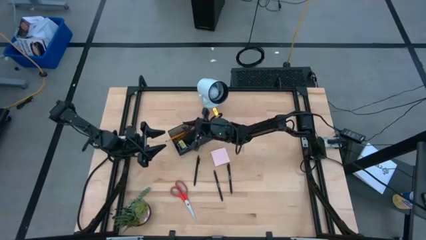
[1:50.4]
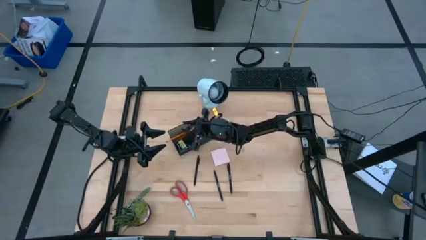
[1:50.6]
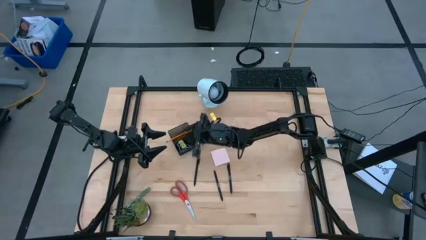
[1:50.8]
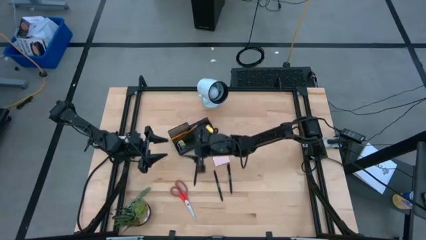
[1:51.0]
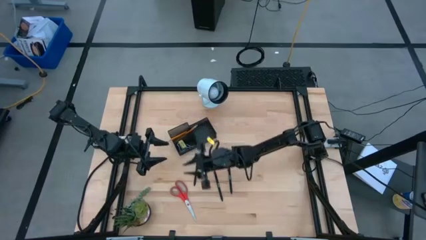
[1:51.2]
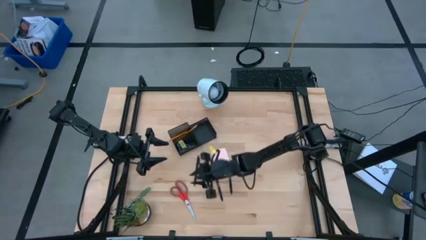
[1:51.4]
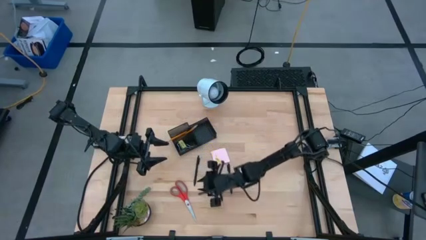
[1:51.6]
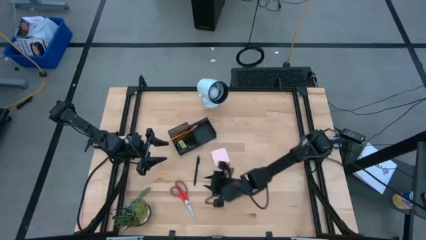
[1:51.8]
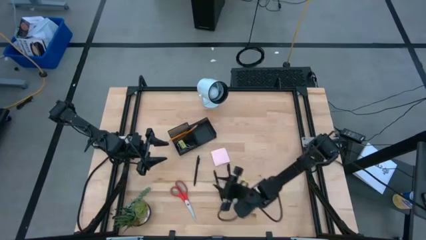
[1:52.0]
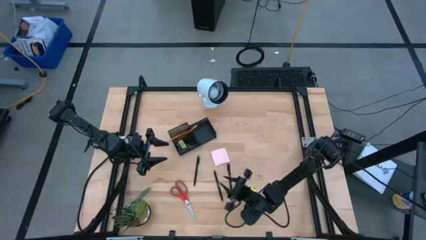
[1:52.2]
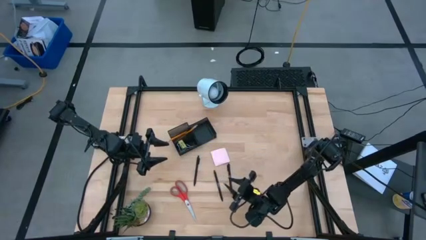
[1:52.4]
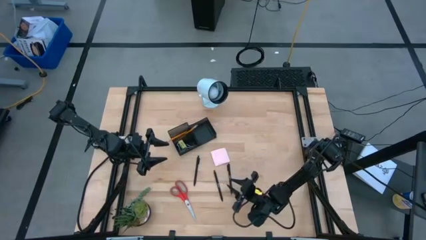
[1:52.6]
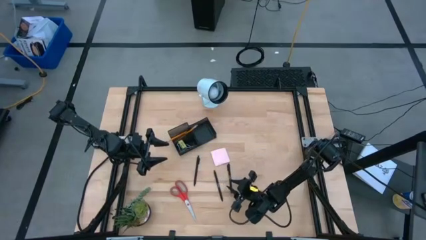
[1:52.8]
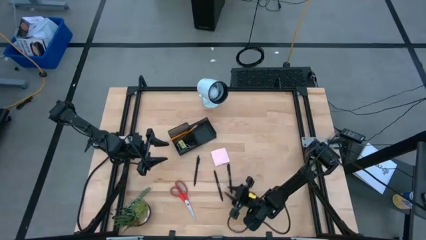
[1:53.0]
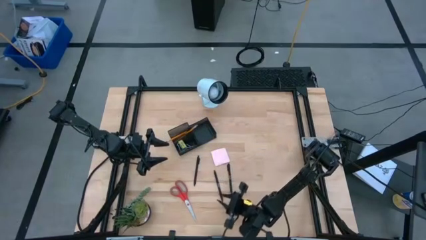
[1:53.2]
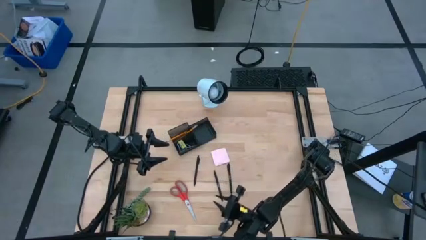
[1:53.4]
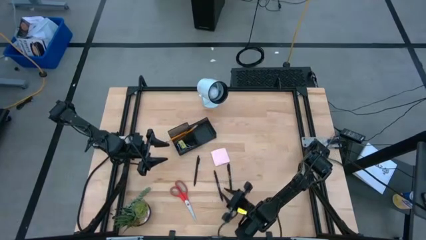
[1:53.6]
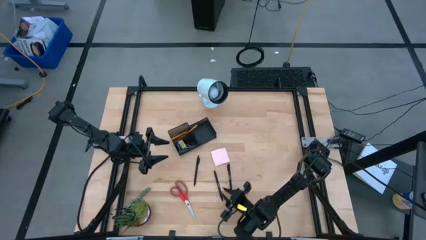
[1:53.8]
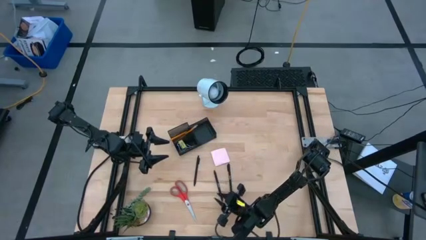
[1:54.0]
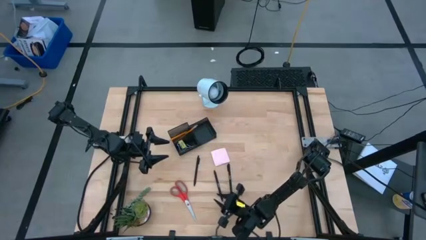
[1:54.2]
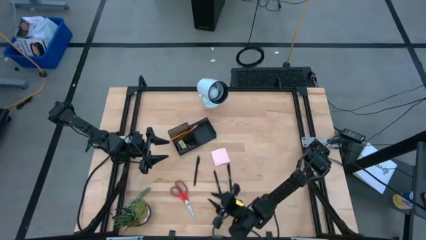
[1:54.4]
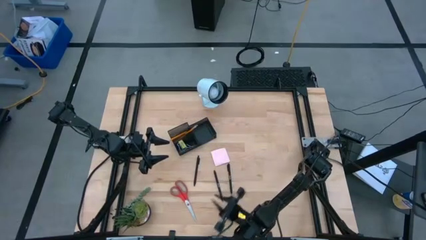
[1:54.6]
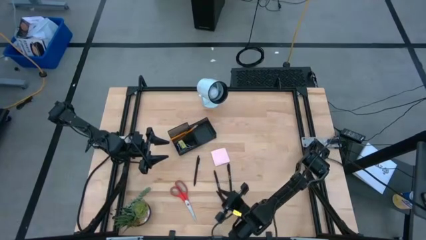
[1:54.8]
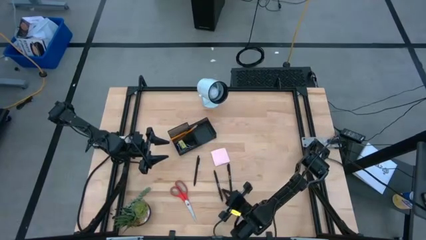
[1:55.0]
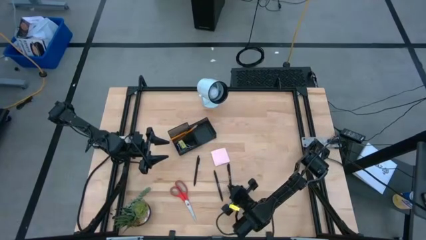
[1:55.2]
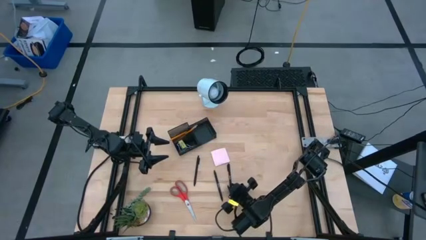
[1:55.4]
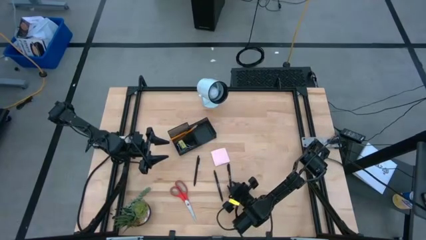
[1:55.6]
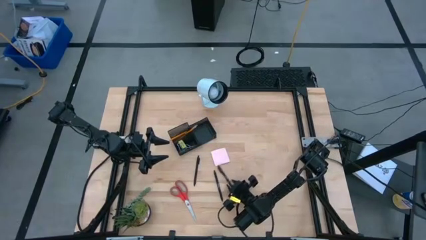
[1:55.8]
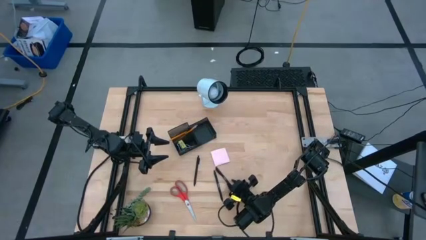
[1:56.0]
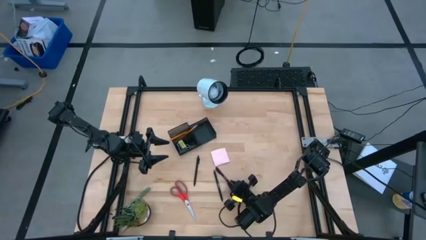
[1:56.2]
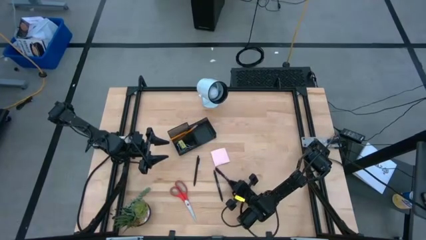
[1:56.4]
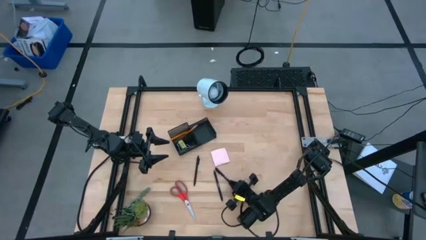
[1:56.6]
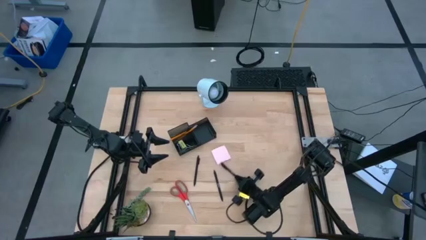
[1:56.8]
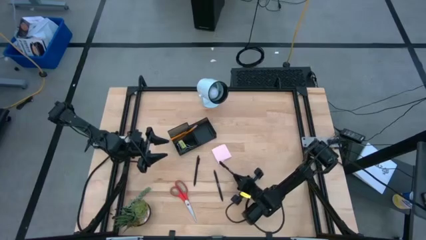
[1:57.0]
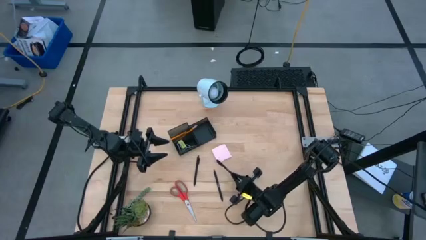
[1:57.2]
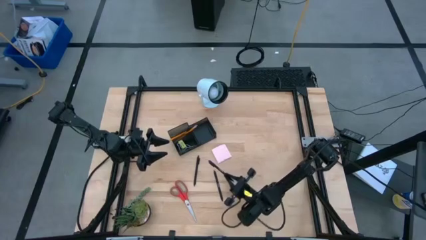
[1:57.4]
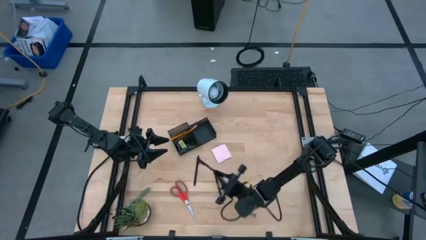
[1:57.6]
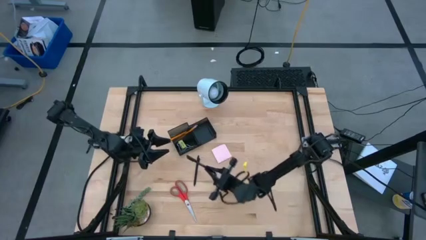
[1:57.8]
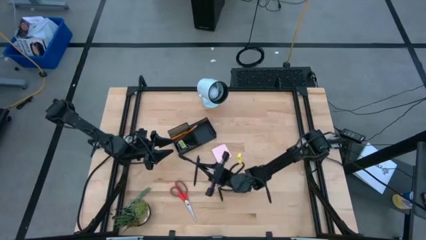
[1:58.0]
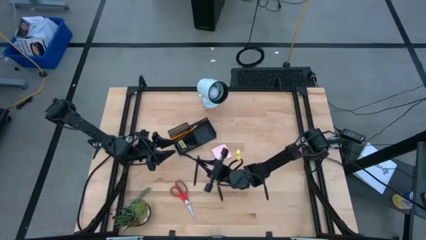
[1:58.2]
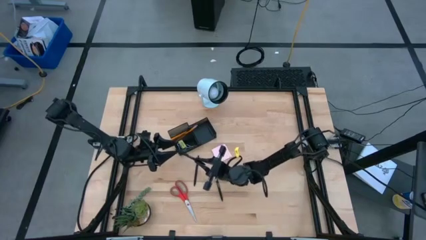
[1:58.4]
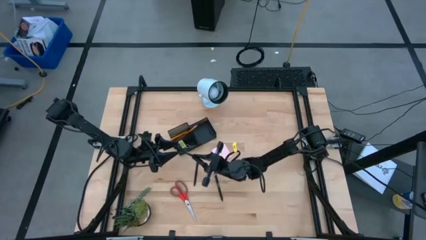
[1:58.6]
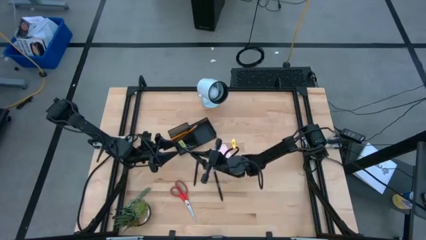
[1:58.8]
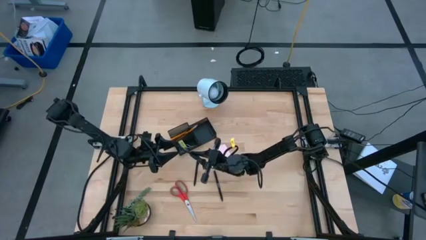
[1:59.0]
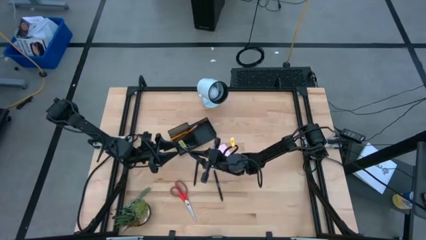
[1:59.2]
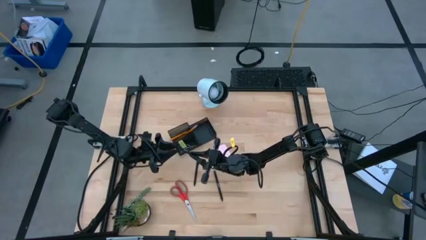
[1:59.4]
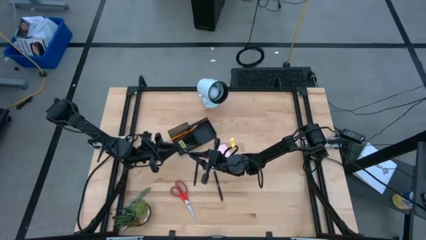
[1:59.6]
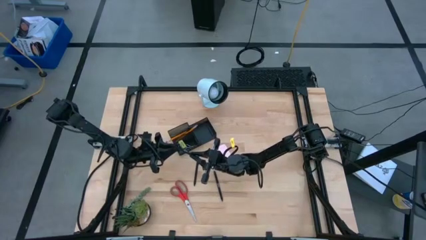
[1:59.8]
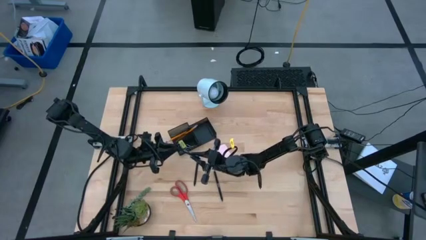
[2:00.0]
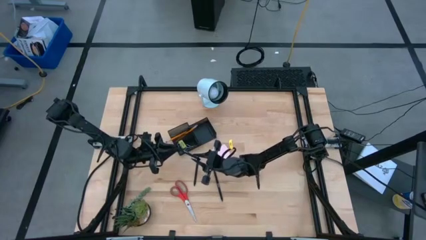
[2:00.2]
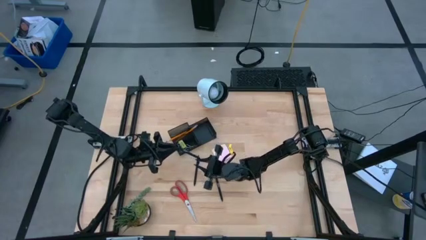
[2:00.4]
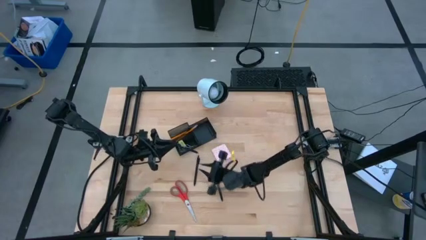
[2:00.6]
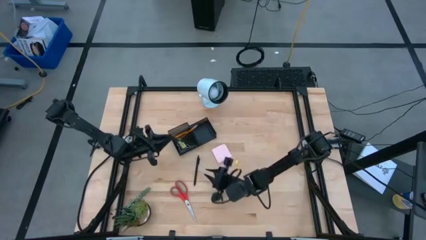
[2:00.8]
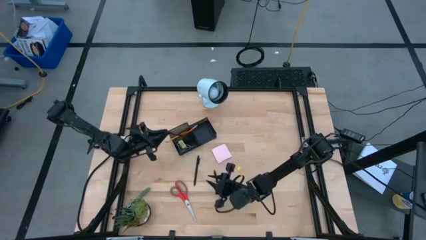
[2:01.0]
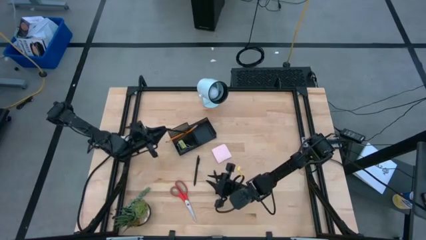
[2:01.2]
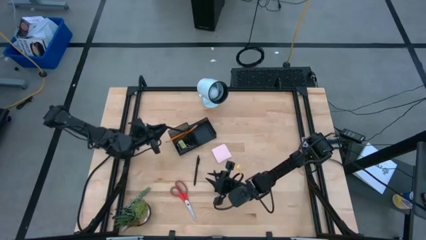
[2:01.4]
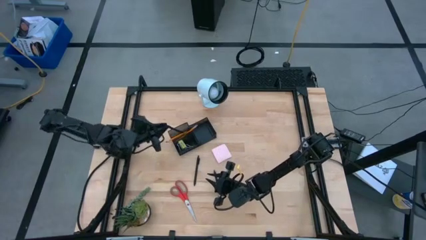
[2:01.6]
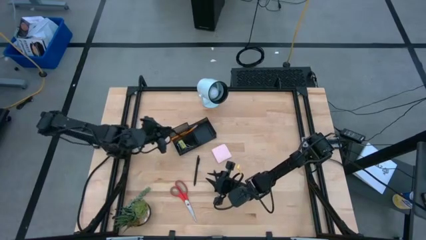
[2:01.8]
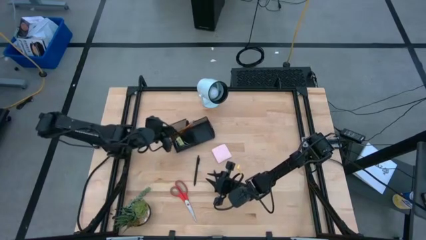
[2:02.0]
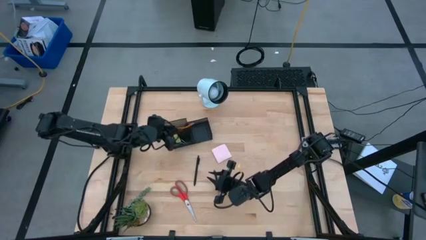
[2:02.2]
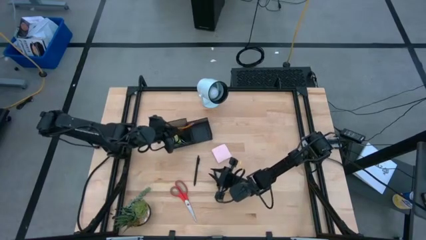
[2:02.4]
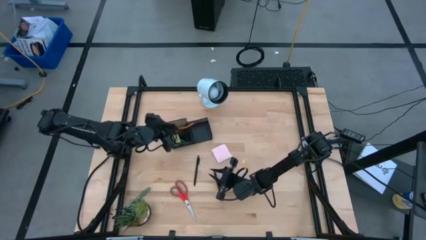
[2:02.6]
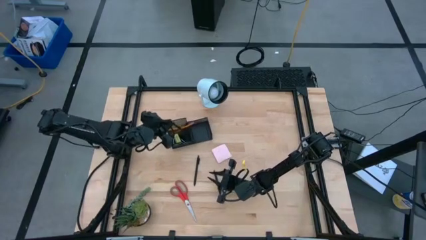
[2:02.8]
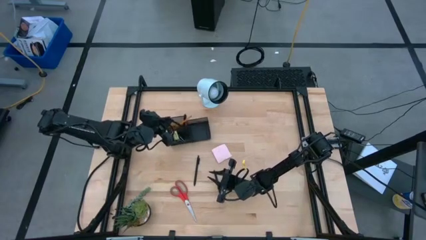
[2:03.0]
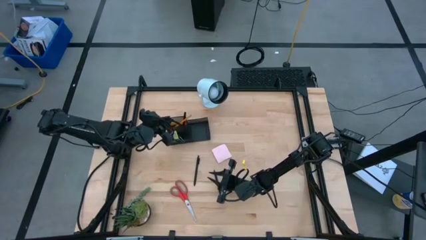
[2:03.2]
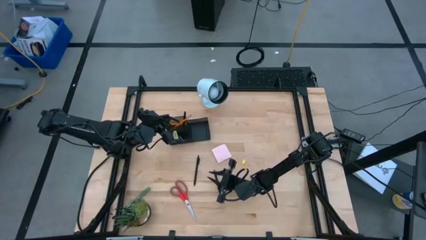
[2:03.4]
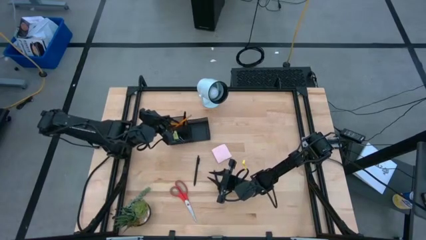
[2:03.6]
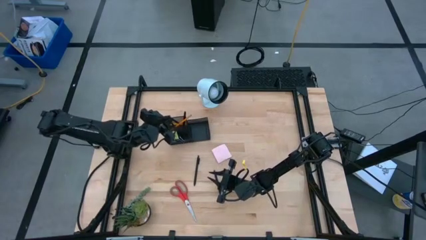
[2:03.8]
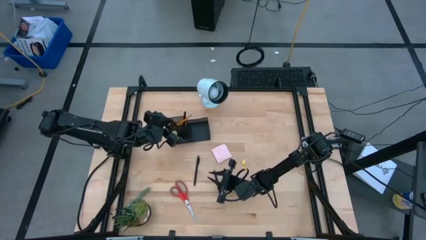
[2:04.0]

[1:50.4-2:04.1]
Task: Pick and place office supplies into organizer
Put the black pen into the black desk organizer

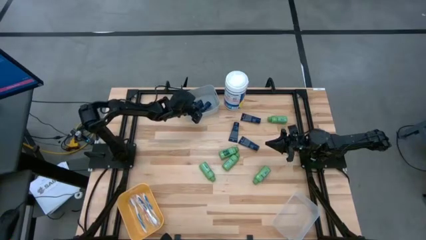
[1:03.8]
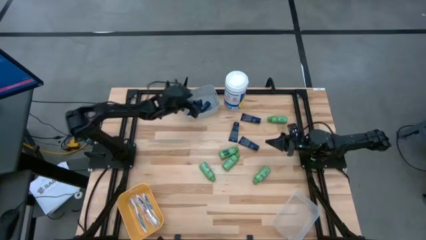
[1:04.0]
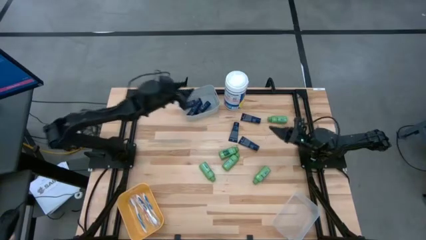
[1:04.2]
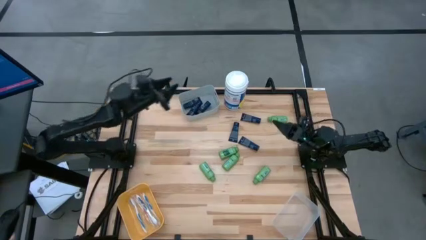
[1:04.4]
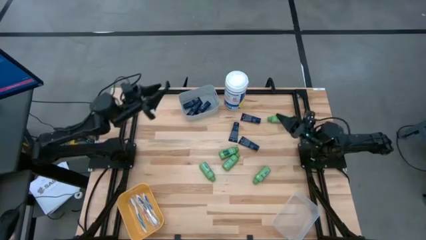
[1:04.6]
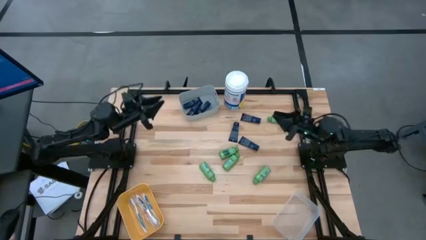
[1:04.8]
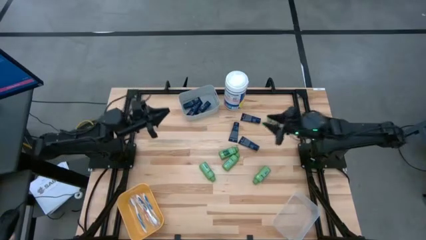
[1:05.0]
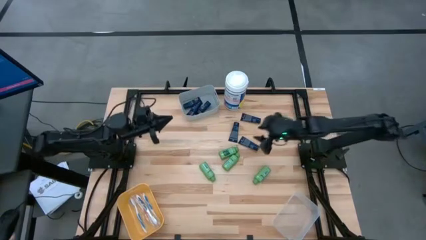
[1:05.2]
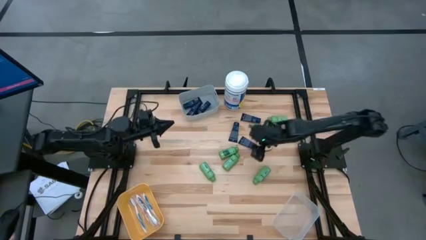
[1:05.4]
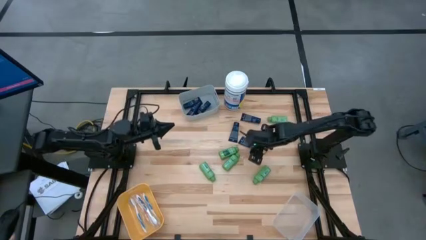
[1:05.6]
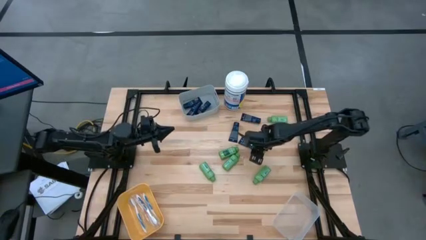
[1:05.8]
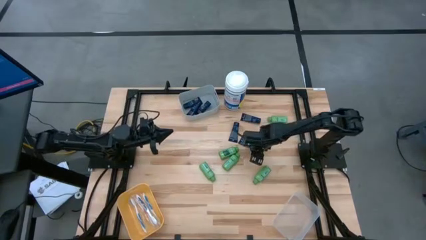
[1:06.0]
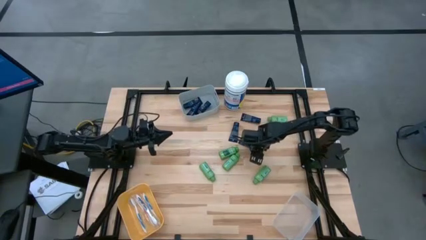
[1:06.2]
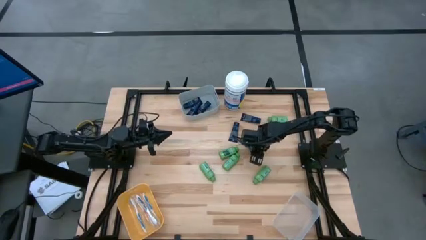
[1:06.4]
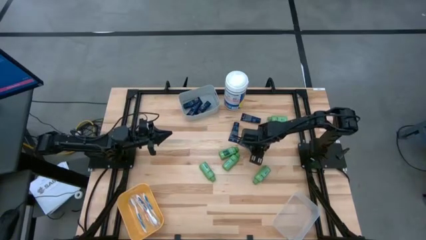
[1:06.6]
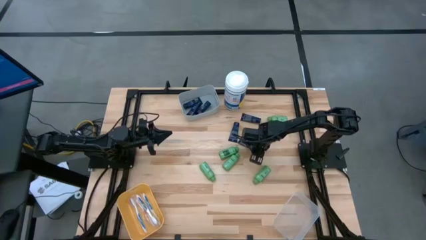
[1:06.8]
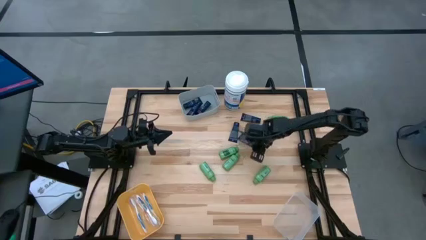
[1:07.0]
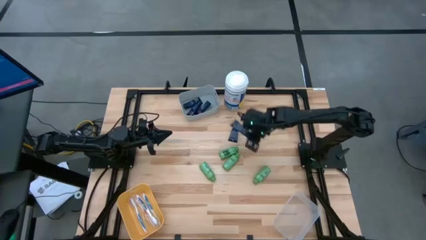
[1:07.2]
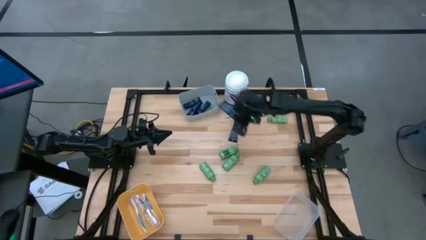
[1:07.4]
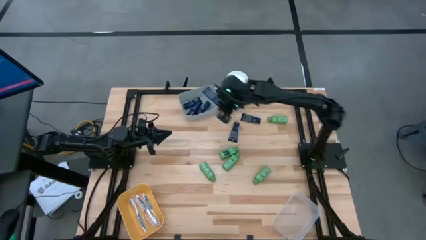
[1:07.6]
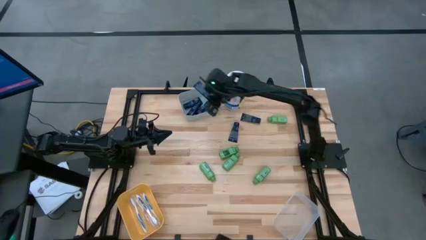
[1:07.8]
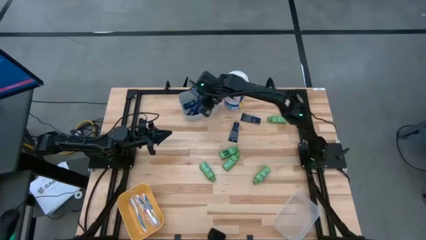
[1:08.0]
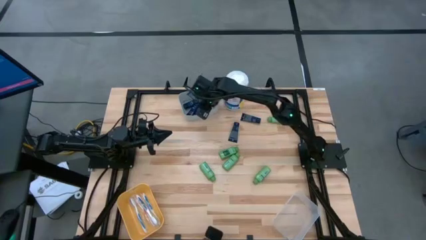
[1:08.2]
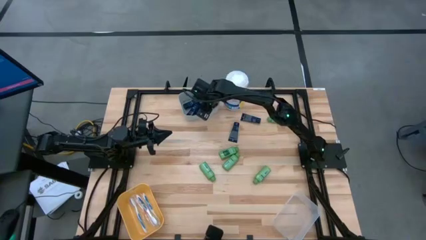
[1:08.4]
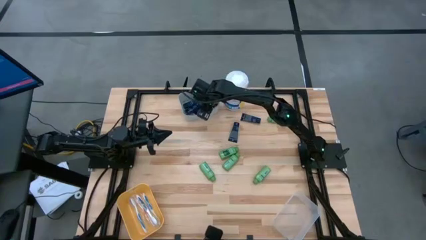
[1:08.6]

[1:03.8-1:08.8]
Task: Pick & Place Travel size toiletries
Put the dark blue shave cream into the gray bin
